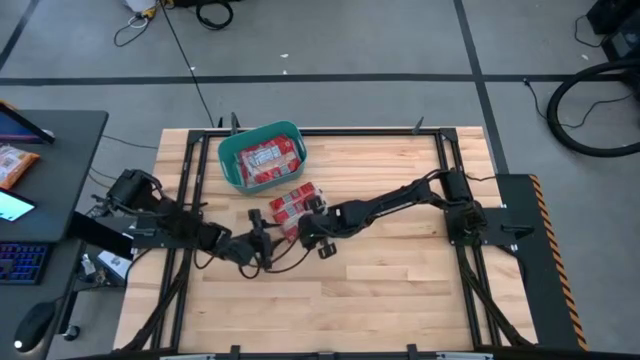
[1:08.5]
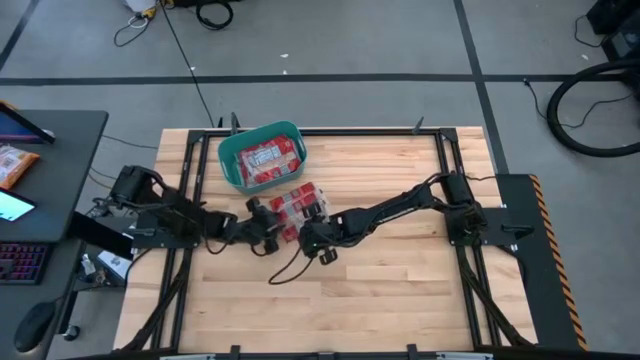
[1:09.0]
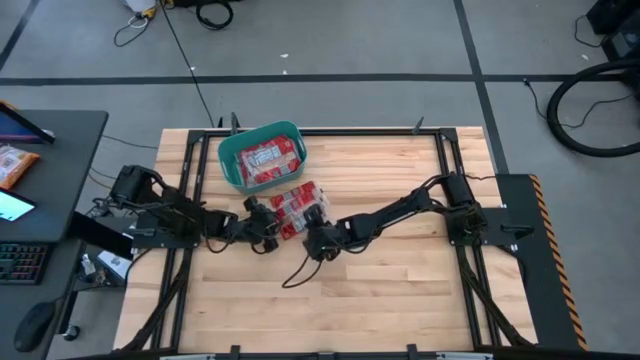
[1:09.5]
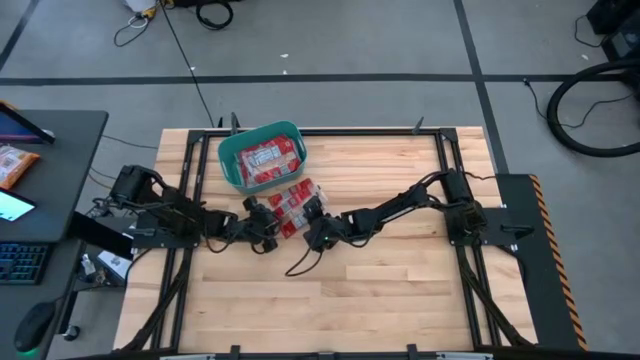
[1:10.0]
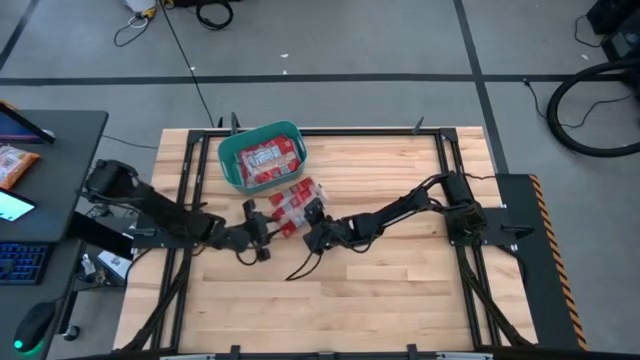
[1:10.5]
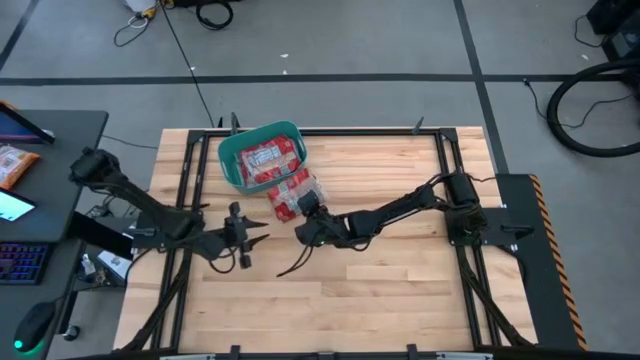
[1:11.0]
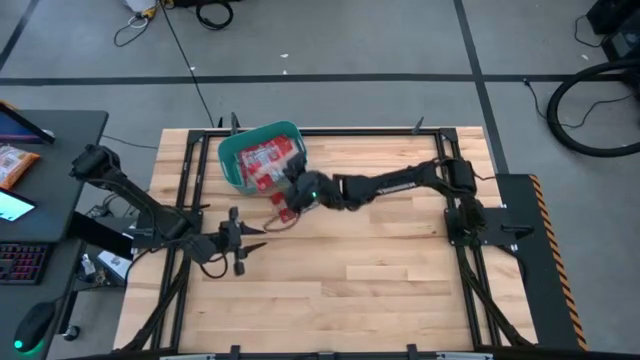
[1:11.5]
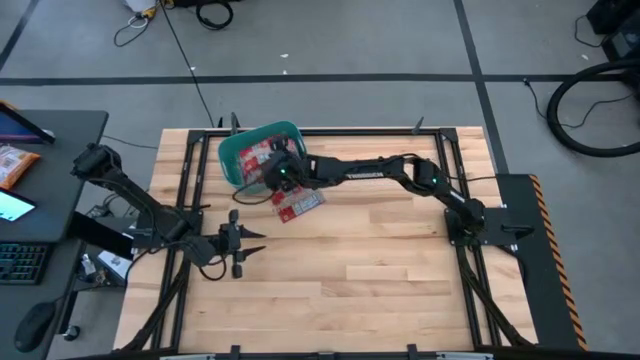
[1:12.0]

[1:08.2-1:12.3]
Task: Sort popcorn bags into baskets
Put the popcorn bag into the green bin

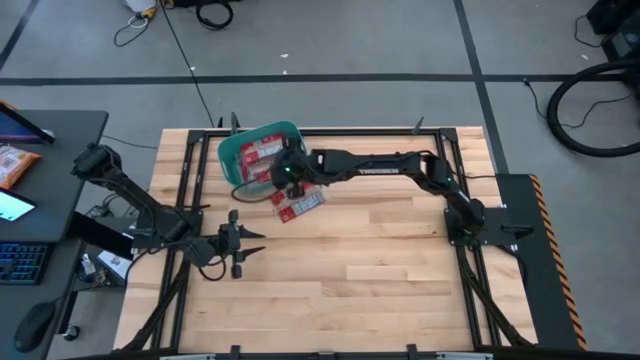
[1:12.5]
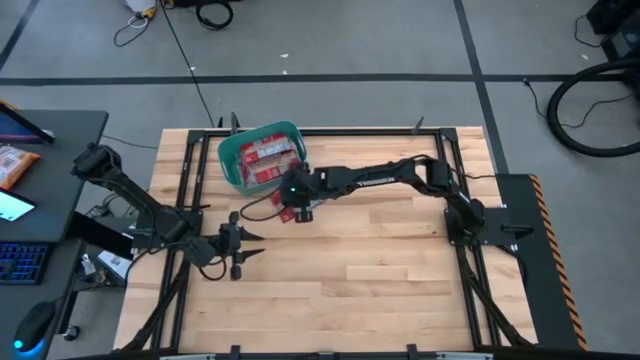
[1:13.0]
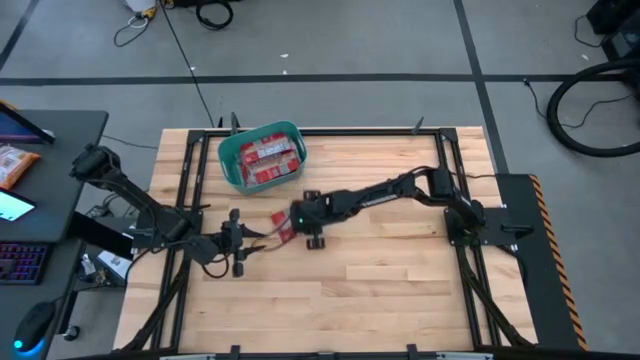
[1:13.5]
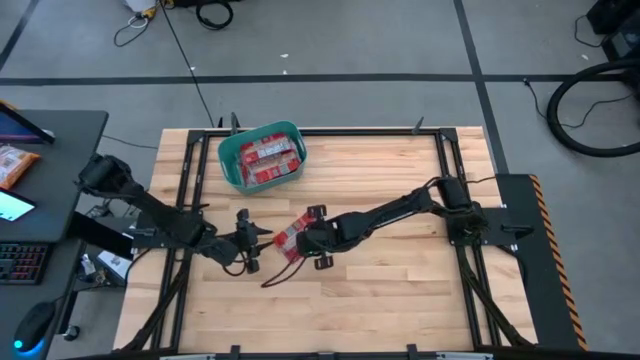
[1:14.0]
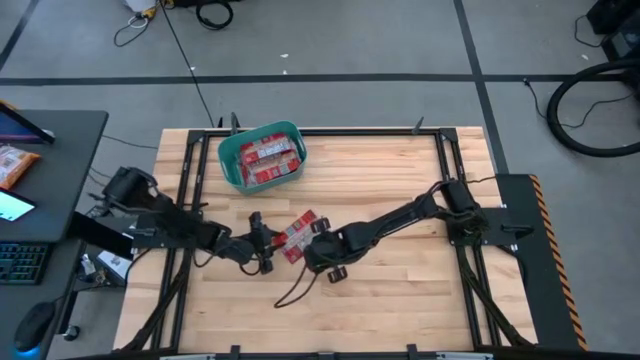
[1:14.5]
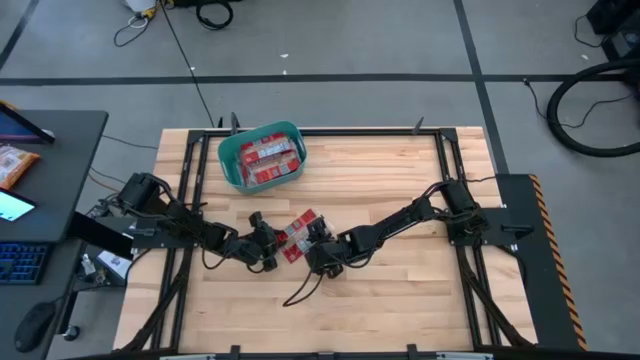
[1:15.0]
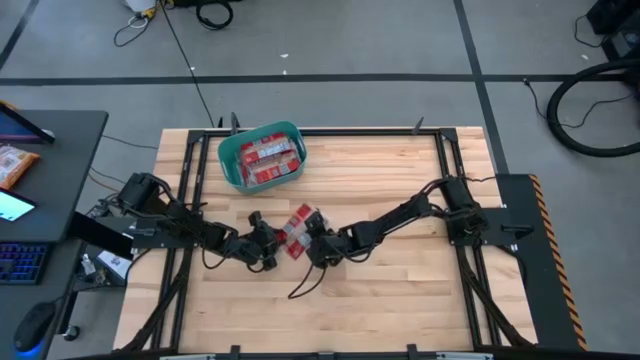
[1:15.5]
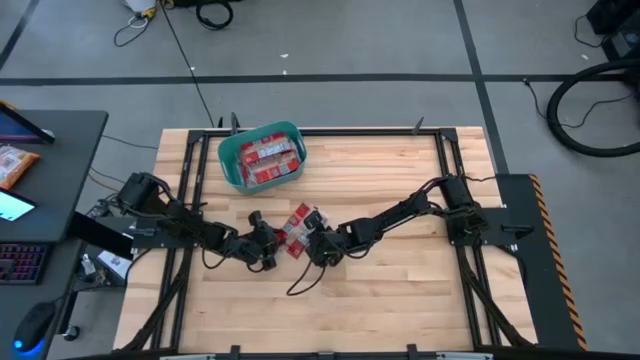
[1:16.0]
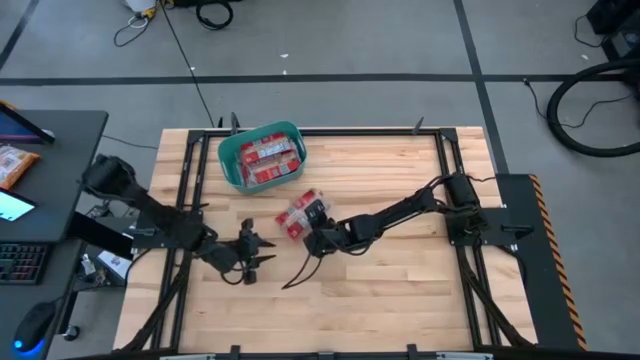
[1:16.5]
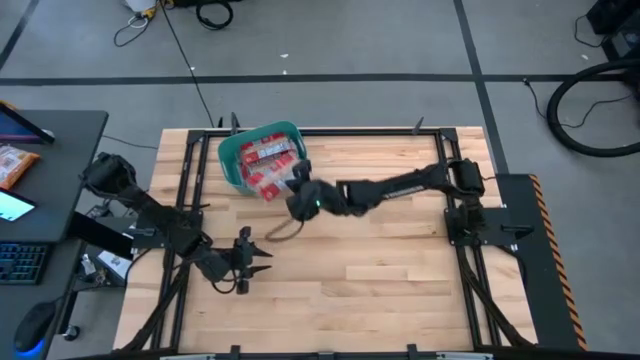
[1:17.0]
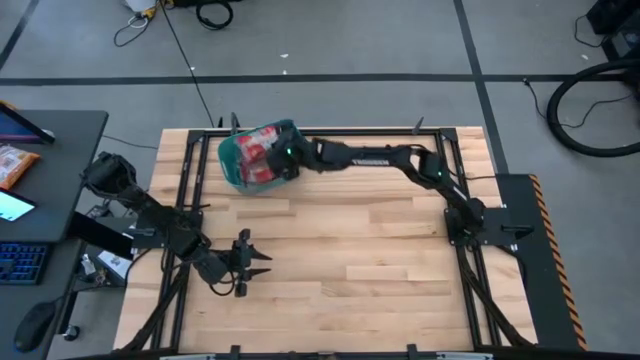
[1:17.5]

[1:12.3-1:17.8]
Put the popcorn bag into the green bin

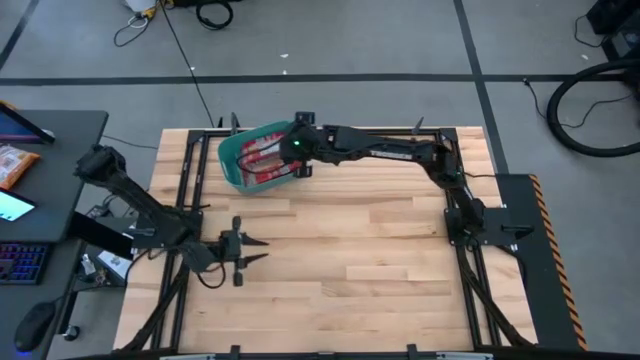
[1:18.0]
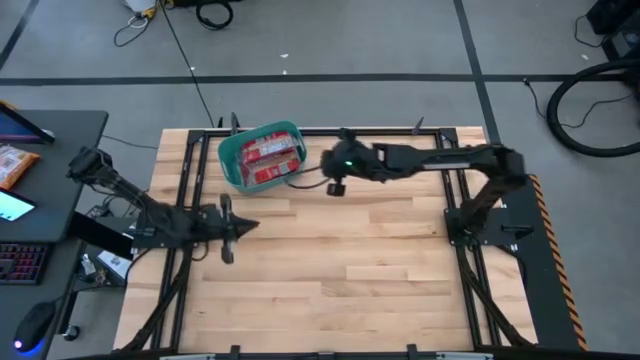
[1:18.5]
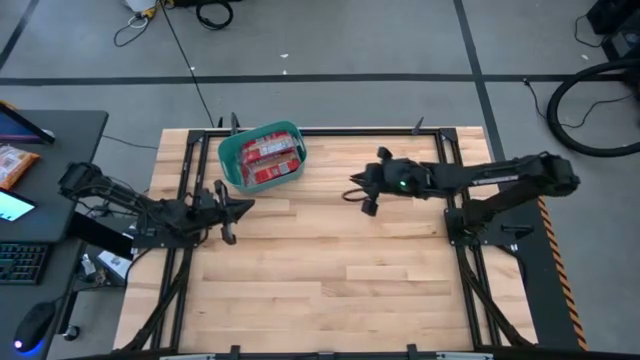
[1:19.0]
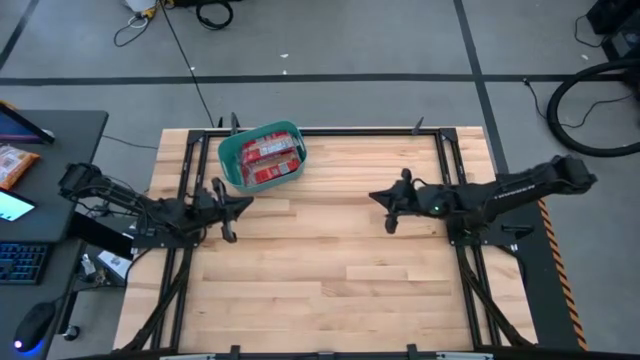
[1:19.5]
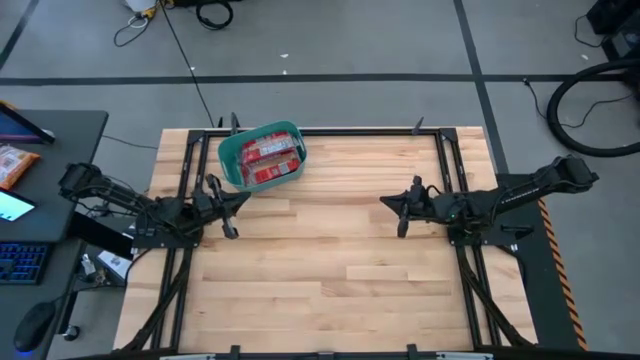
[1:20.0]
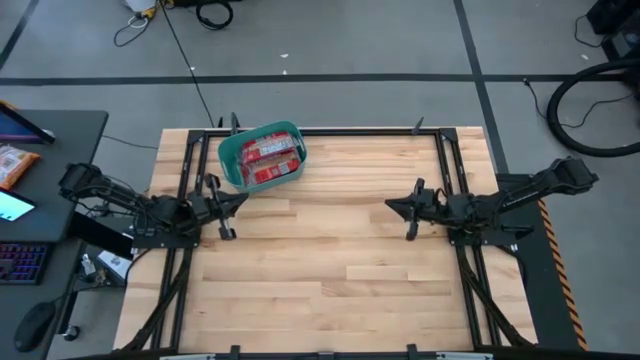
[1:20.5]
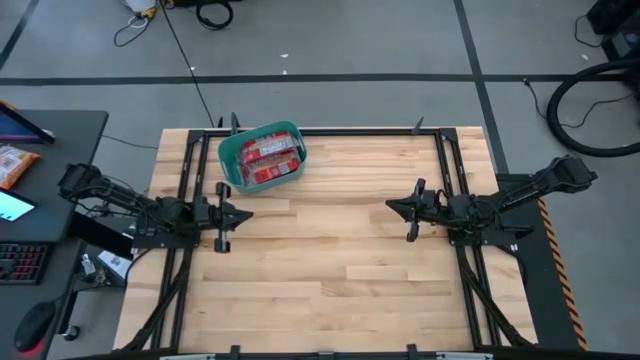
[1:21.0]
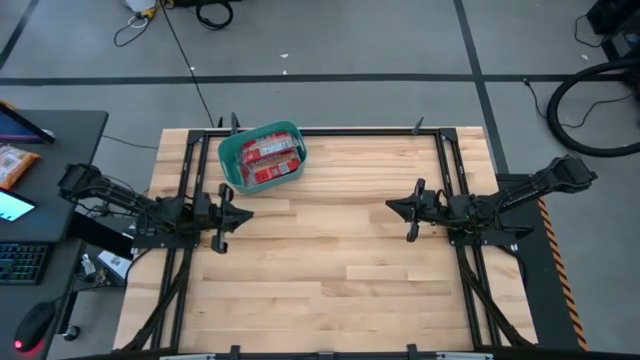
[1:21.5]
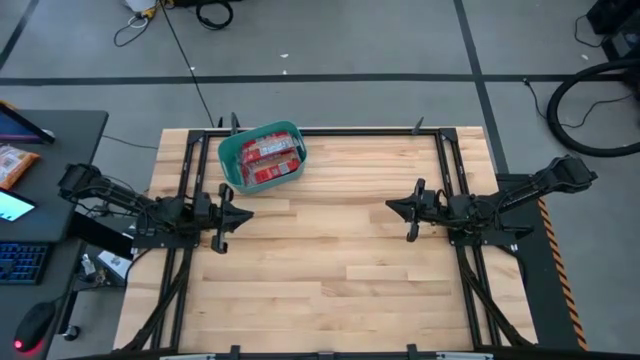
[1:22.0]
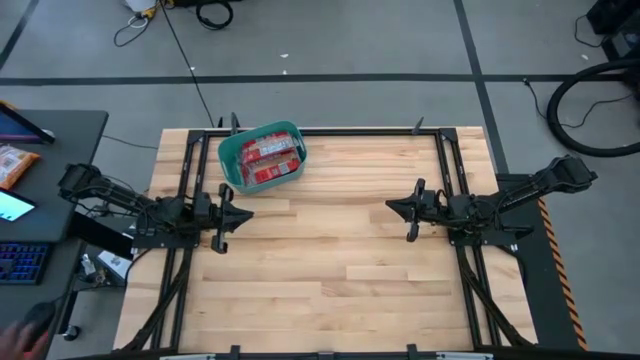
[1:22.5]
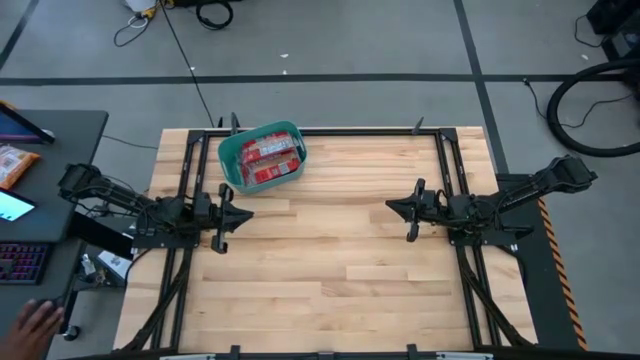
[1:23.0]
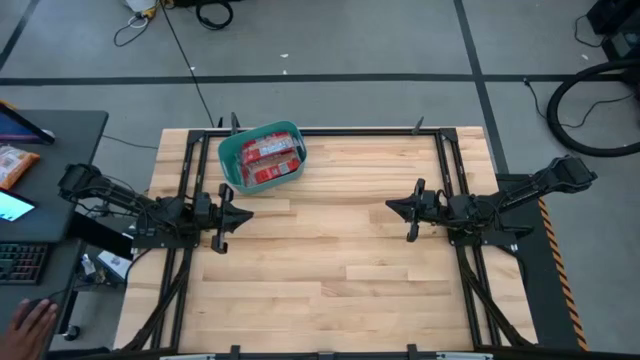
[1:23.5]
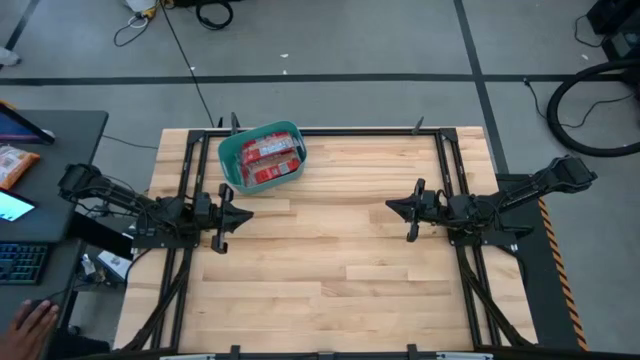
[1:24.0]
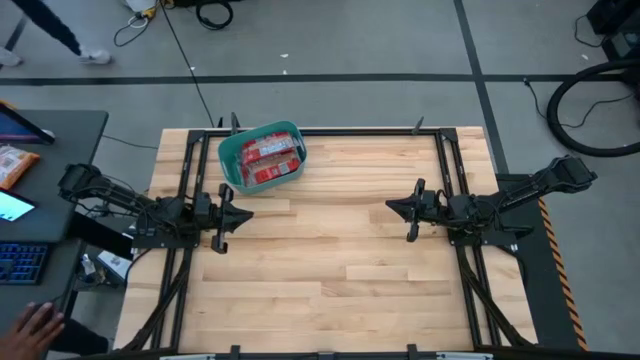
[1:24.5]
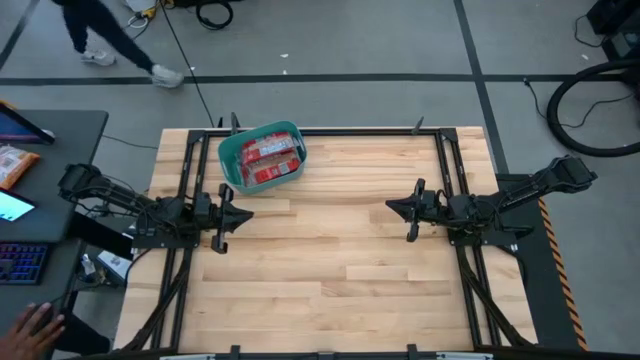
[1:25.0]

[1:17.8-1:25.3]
Return to Home Position

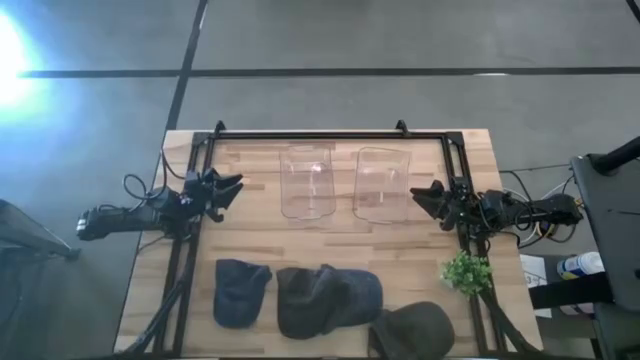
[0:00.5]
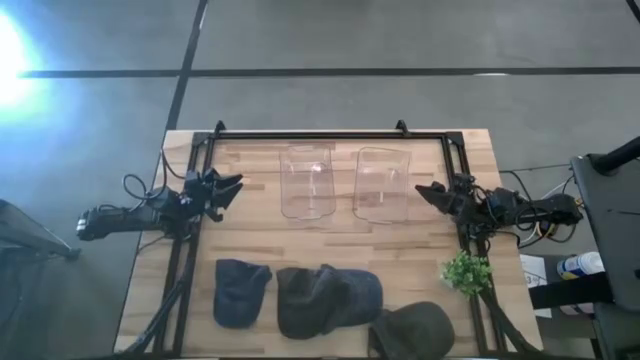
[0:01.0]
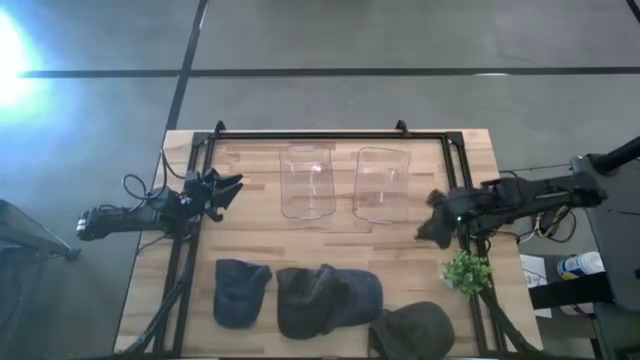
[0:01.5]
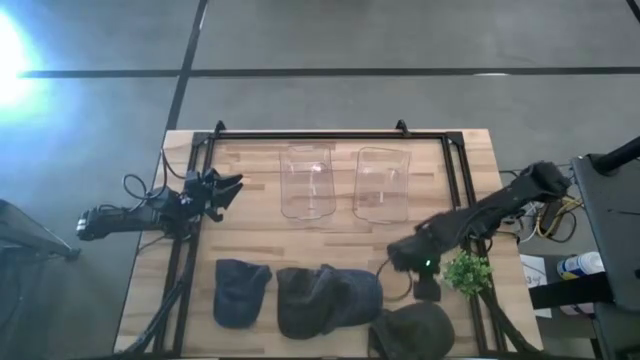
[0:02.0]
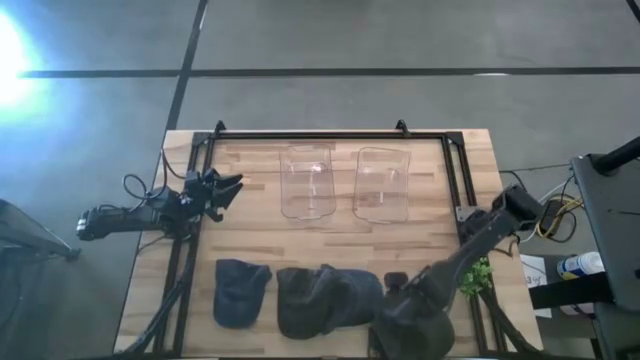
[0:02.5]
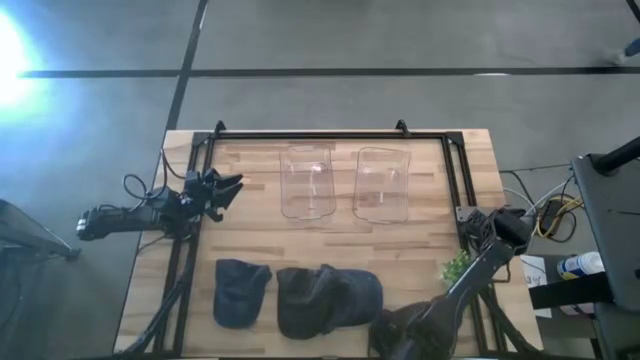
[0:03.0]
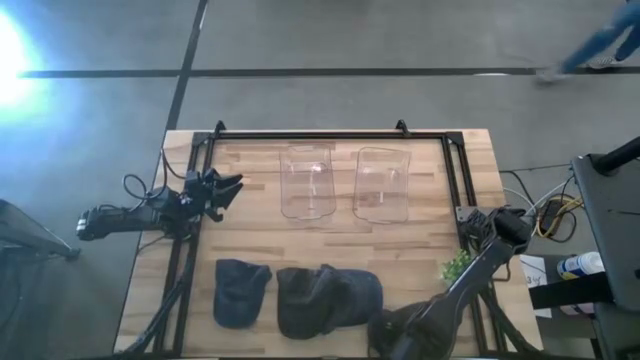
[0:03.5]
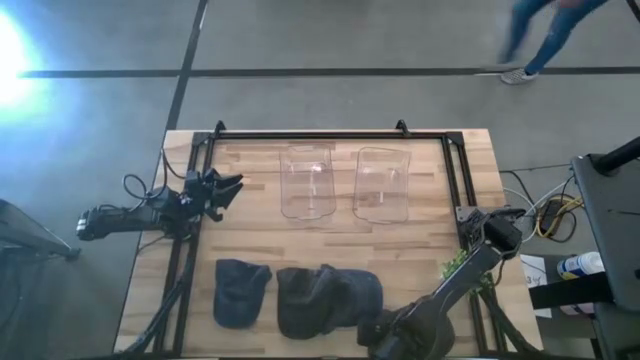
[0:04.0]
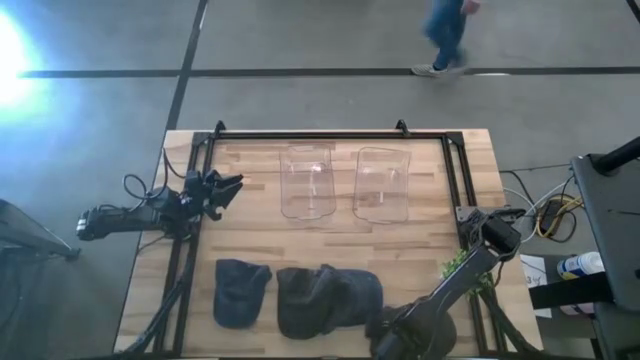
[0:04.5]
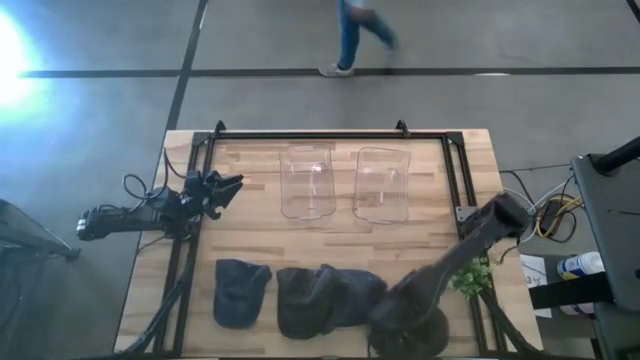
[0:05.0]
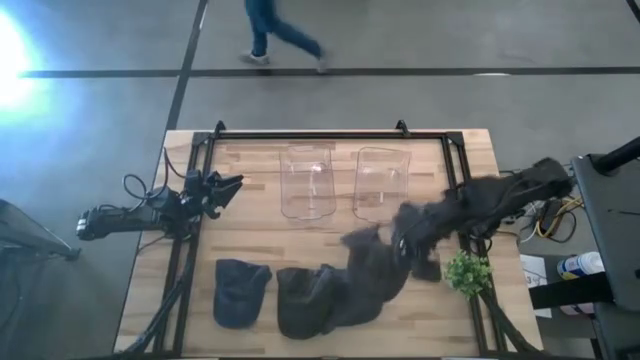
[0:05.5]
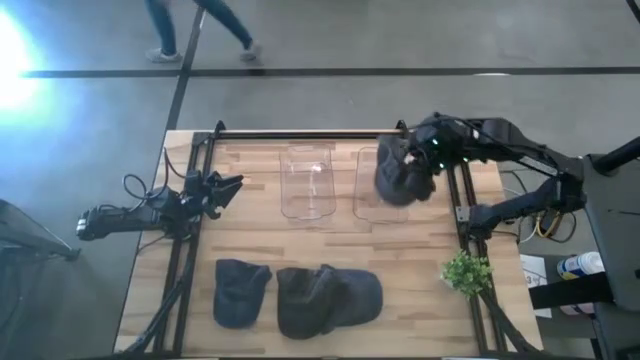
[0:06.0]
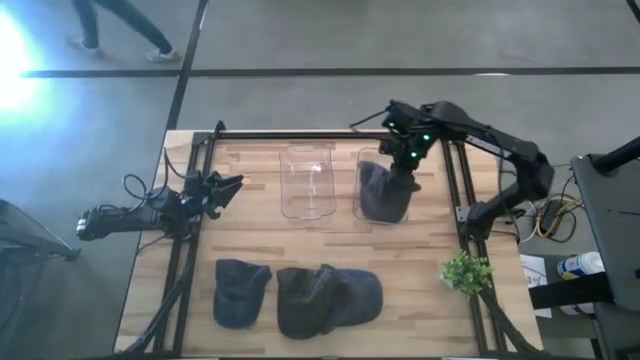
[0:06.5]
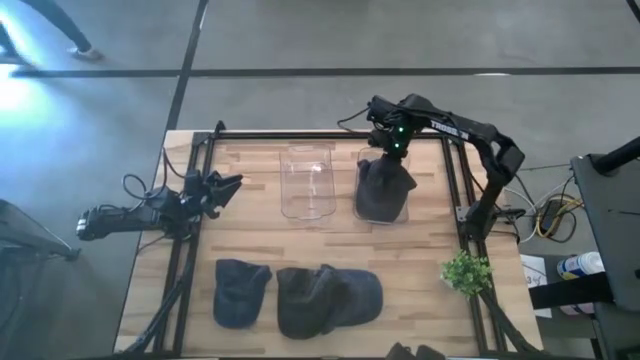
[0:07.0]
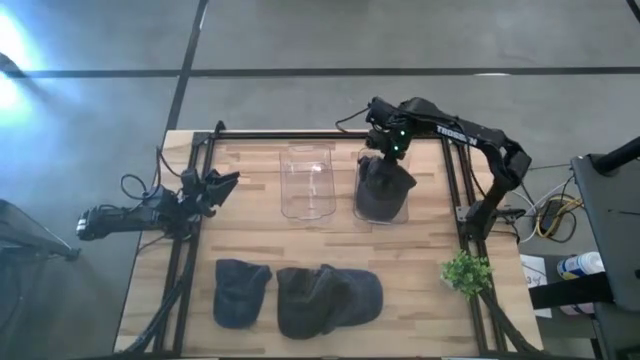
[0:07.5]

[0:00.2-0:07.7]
Task: Pick & Place hat
Put the right gray cap into the right transparent bin
